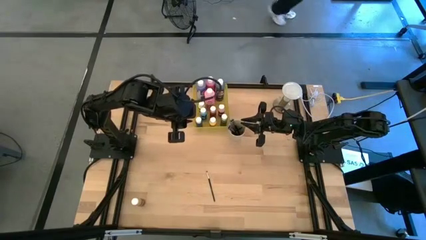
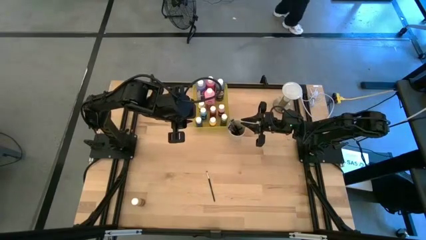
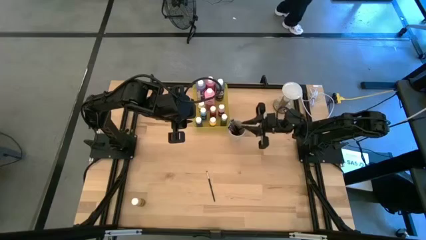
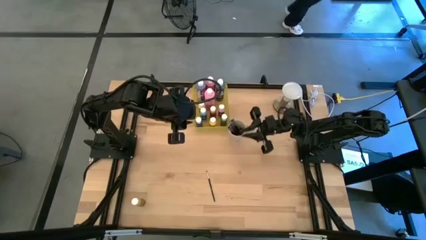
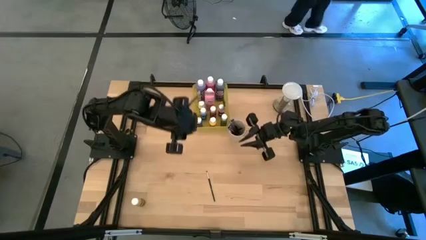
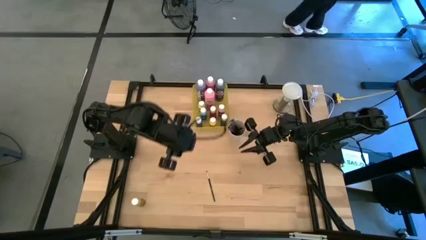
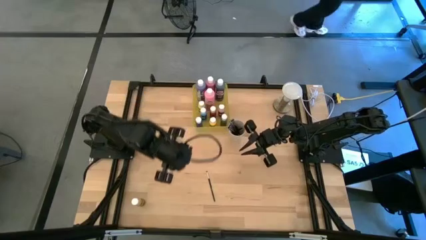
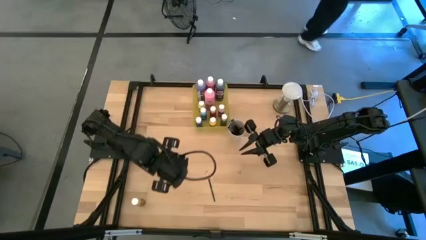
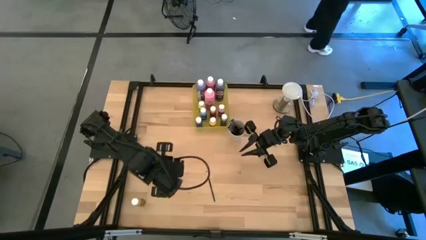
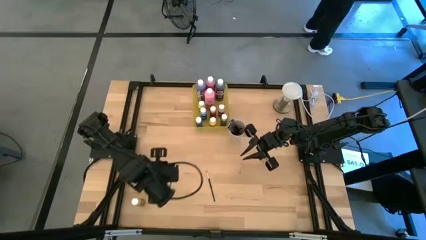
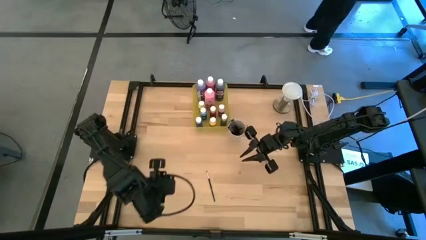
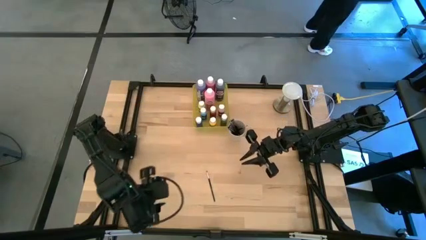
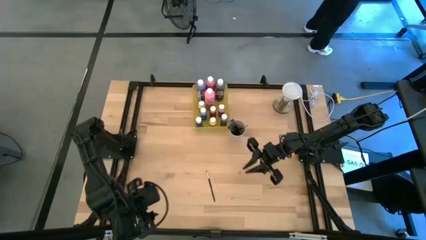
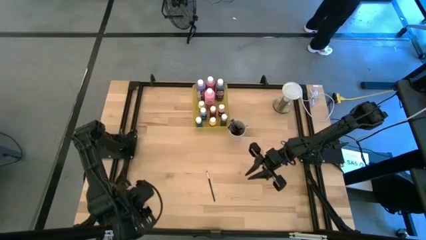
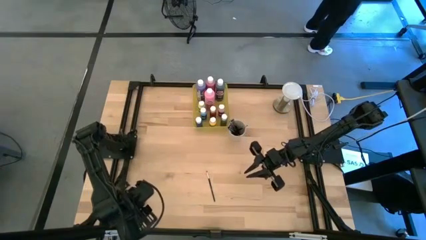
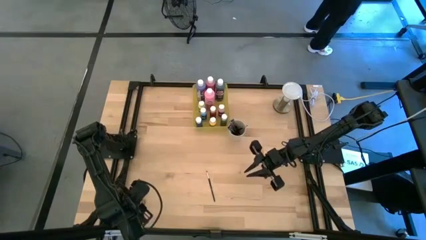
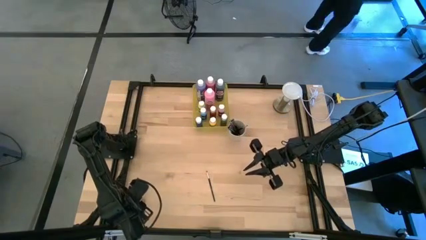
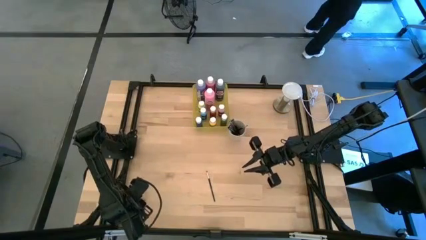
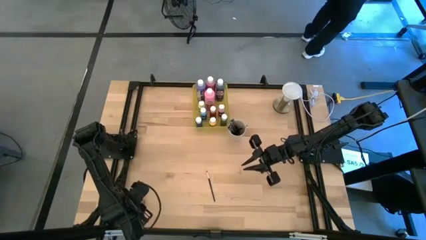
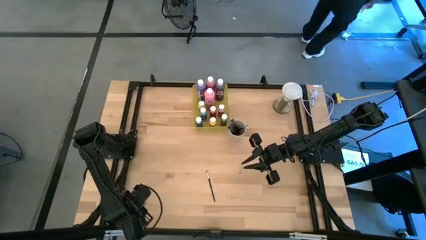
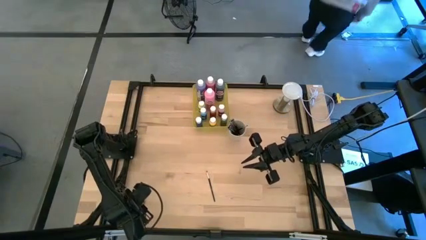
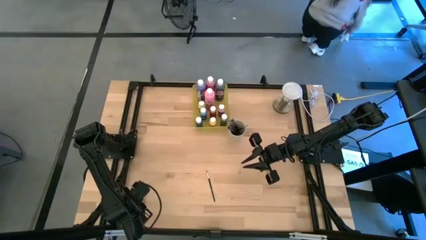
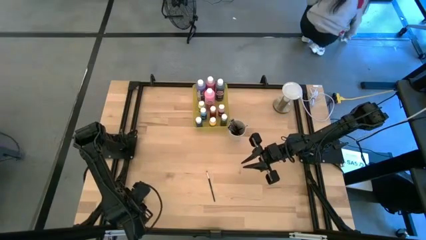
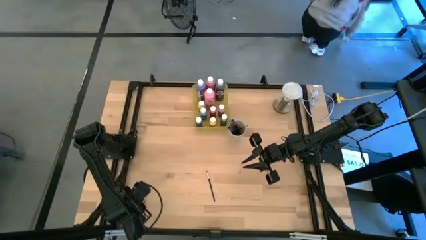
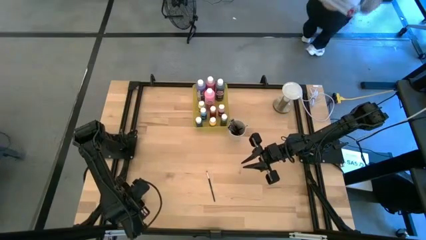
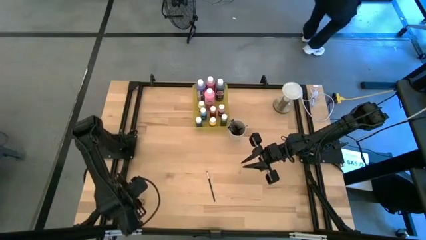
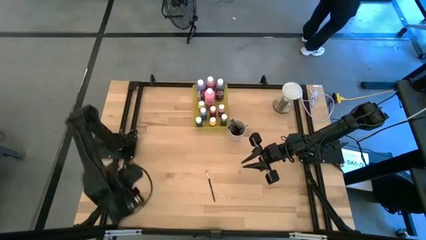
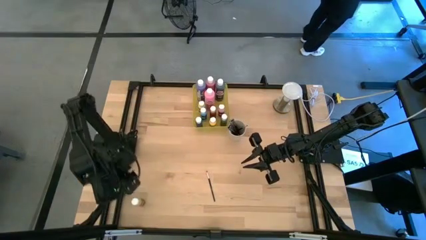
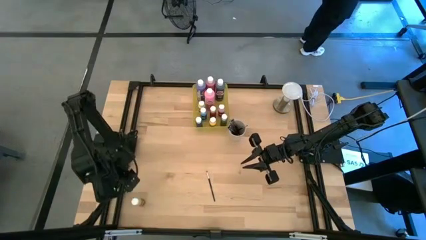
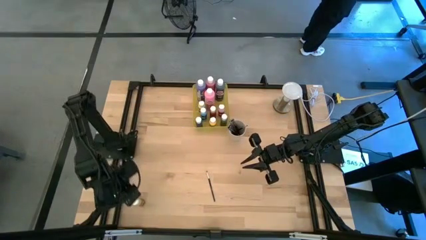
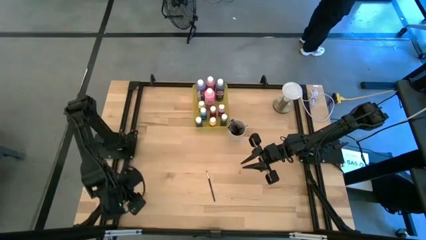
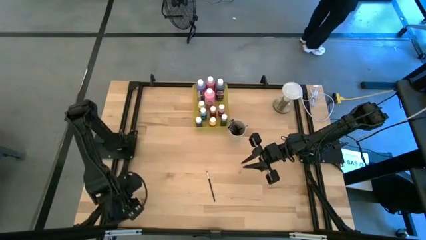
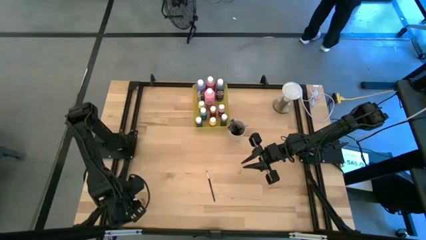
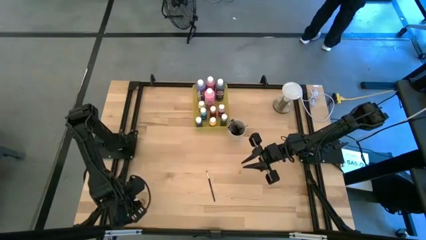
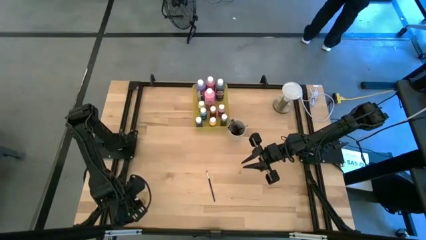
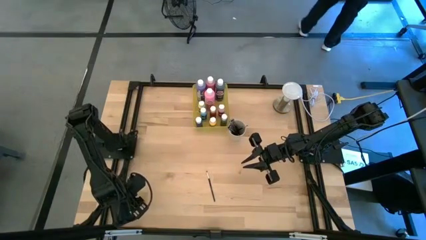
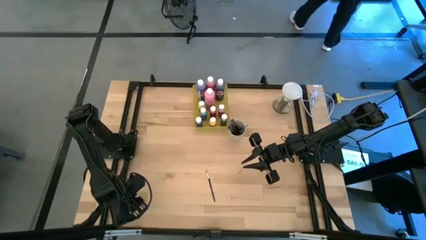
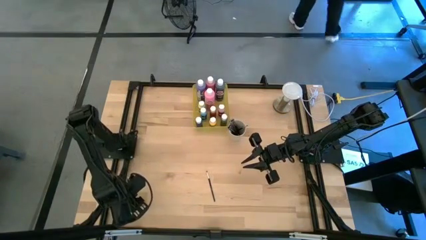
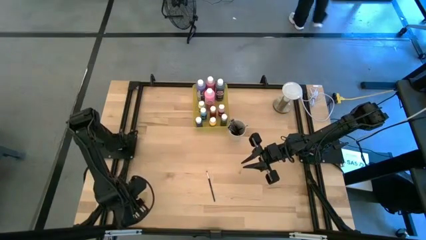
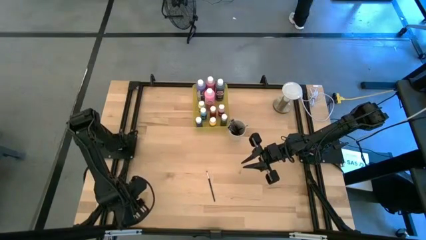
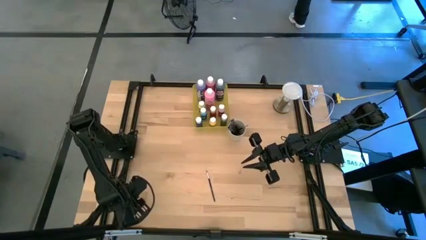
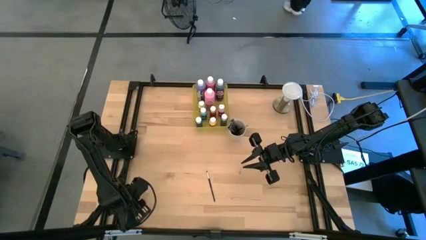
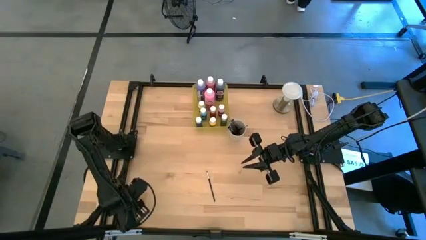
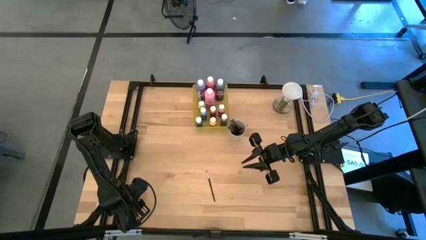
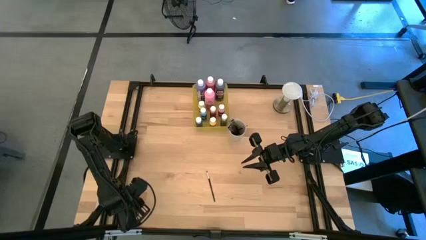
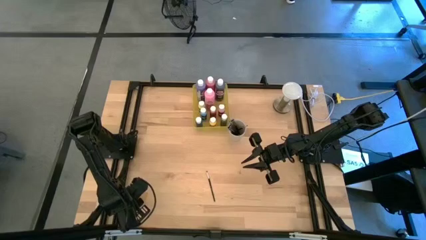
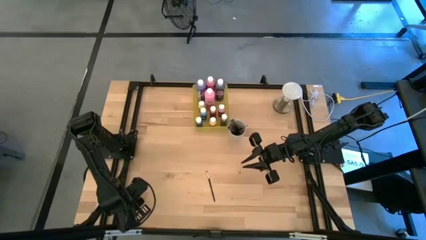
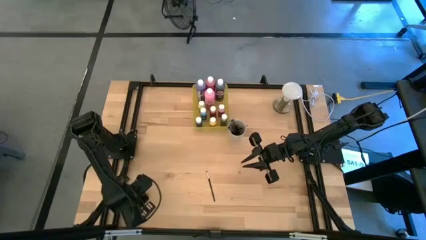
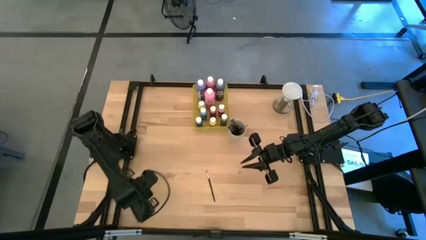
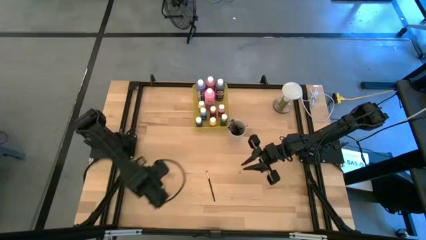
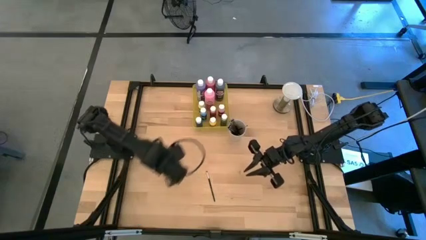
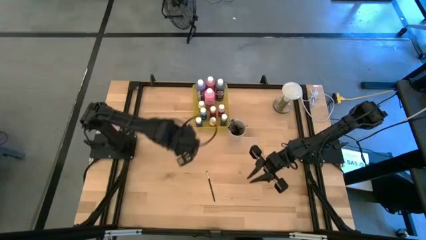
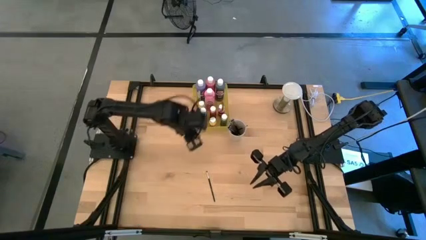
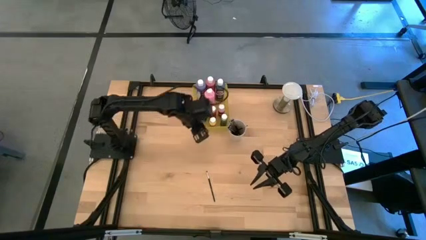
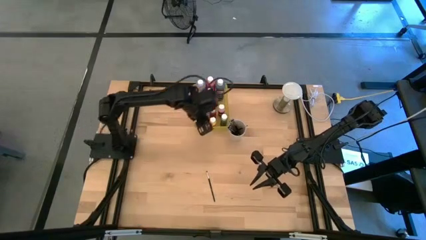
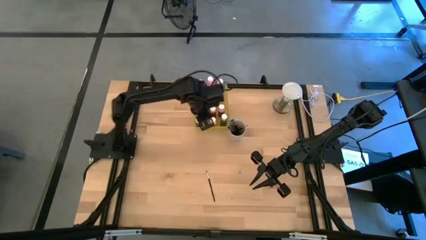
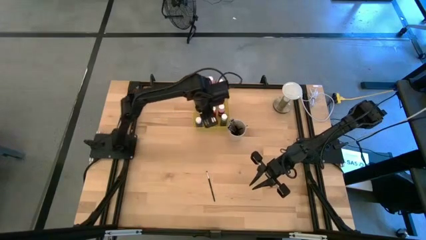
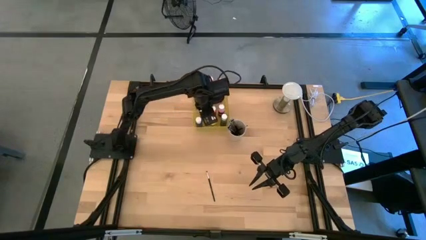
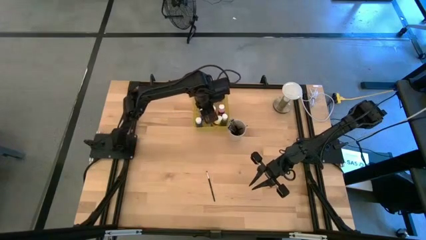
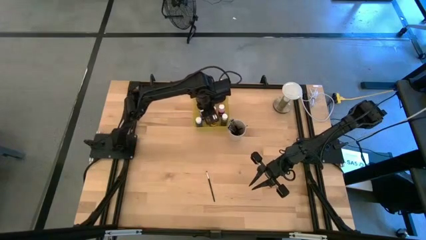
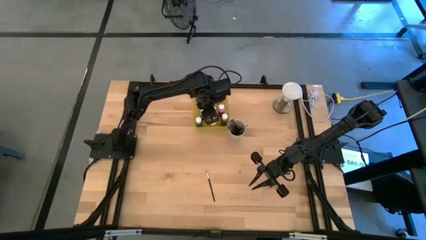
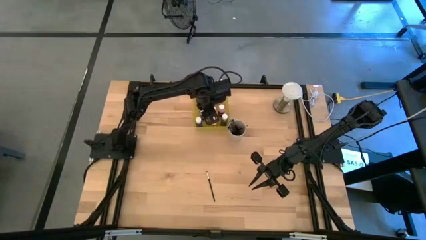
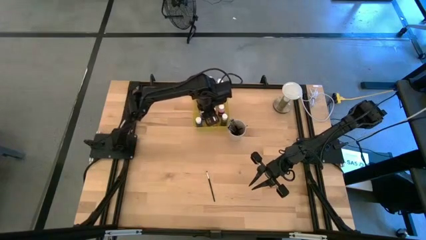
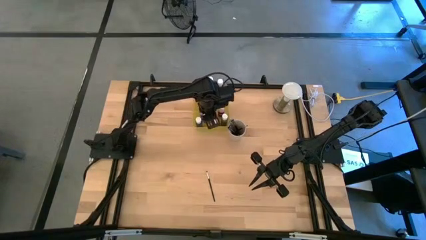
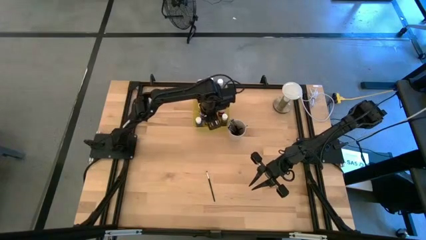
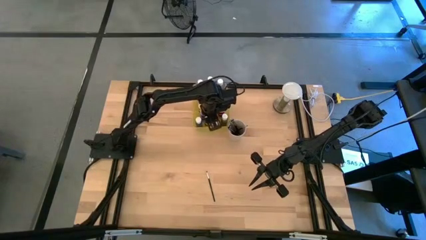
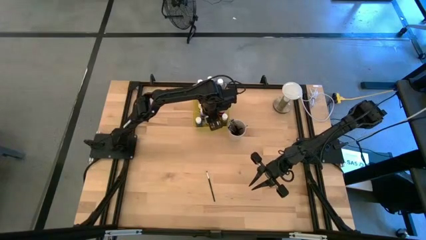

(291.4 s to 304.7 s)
Task: Pick & Place Paint Supplies
Put the small brown paint bottle into the yellow bin

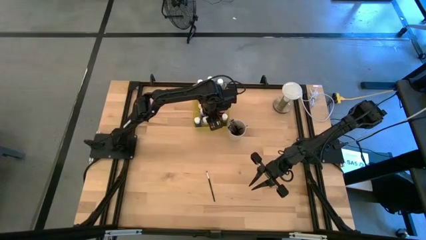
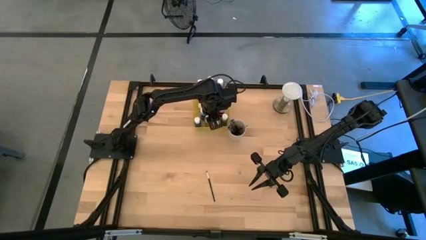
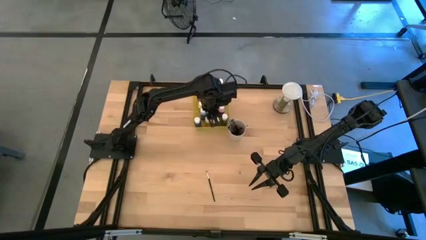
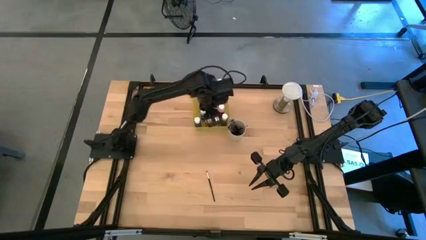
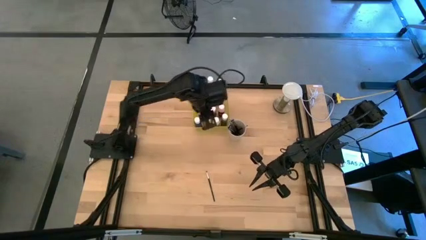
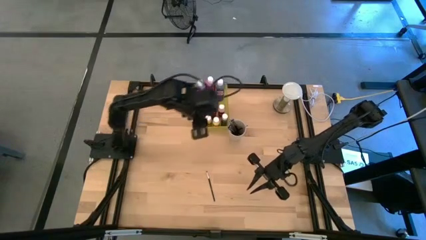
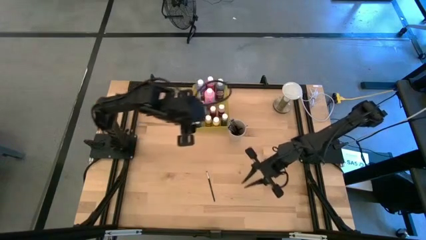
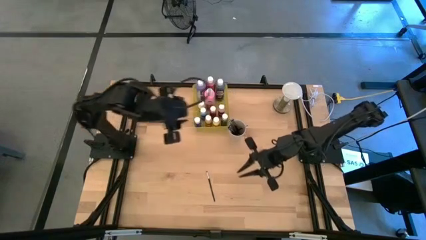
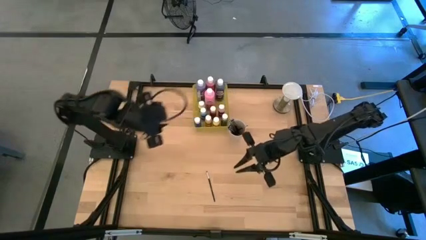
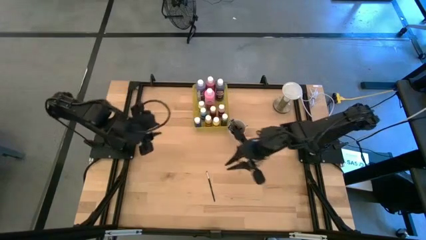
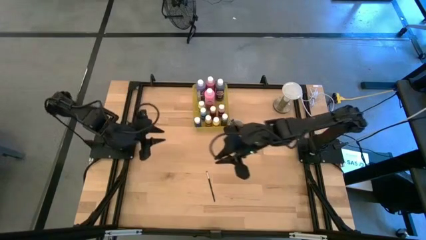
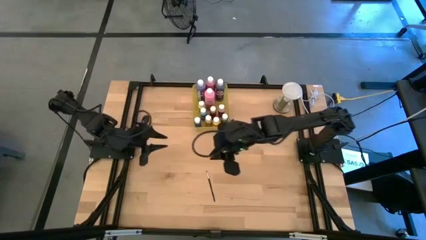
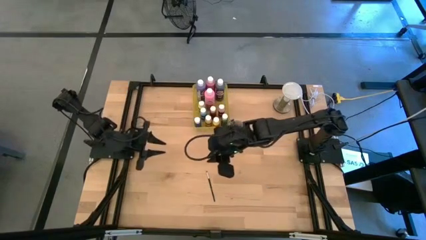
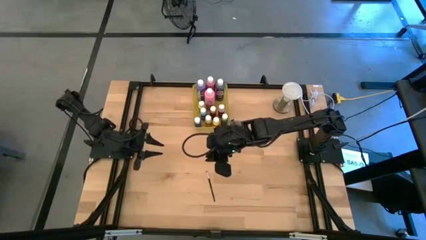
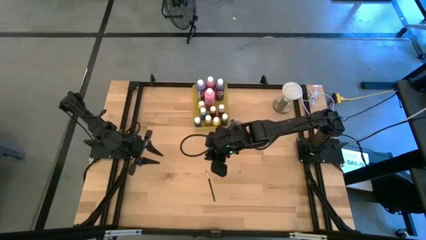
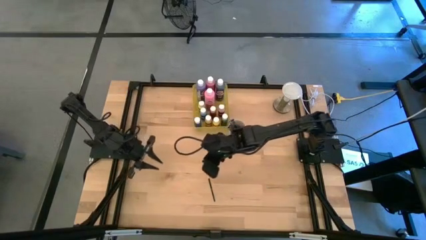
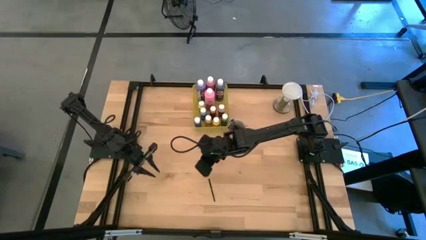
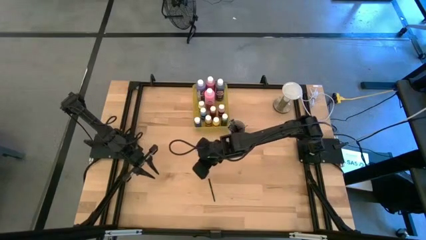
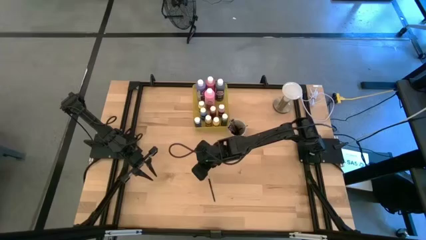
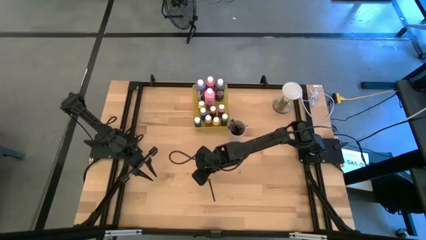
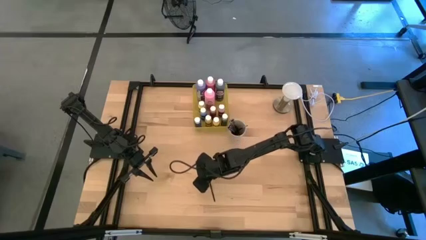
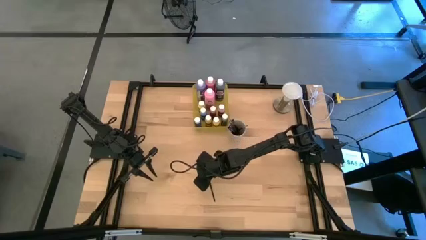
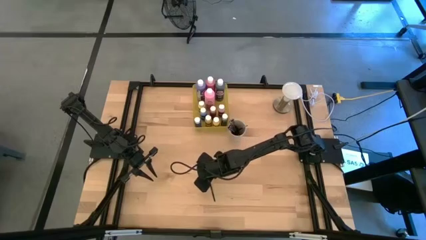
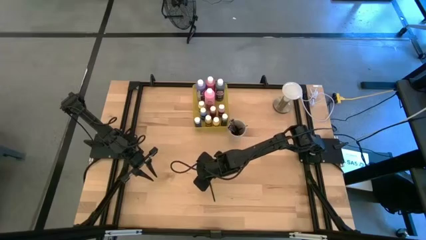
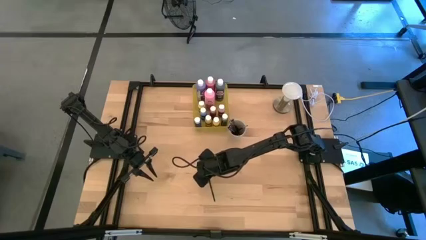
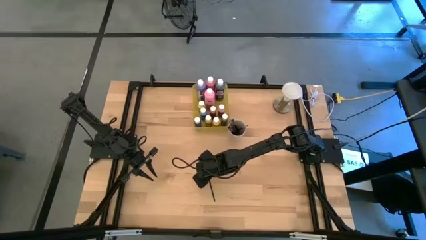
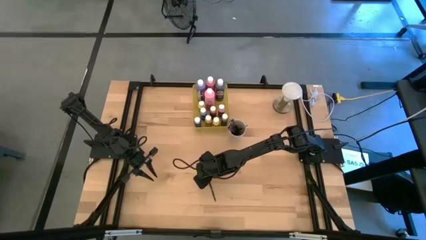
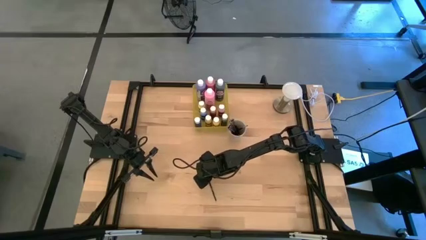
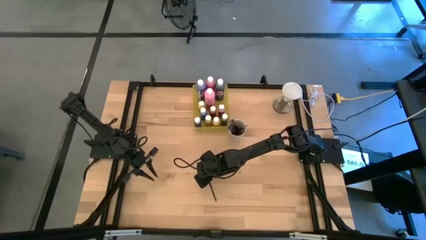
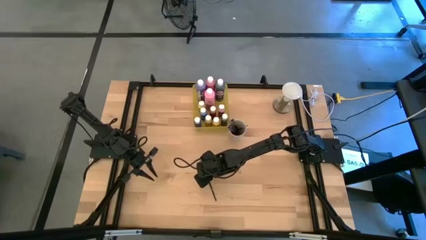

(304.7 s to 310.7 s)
Put the black paintbrush into the white cup
